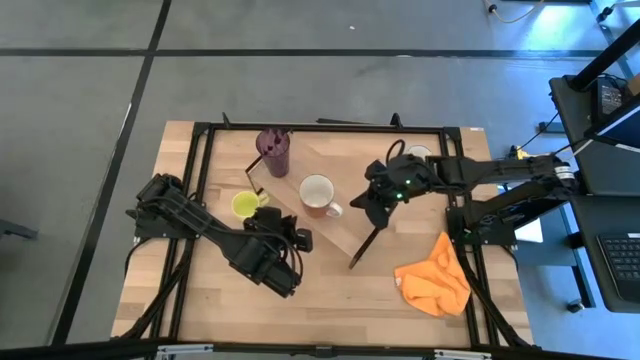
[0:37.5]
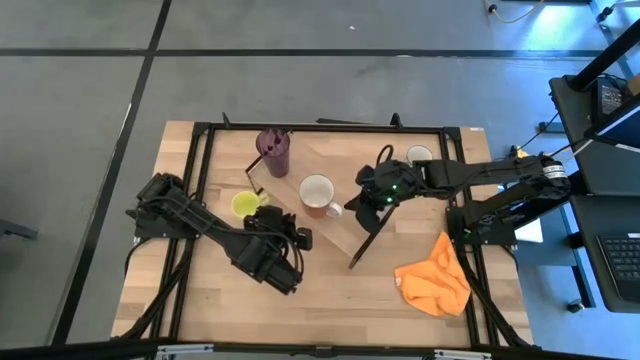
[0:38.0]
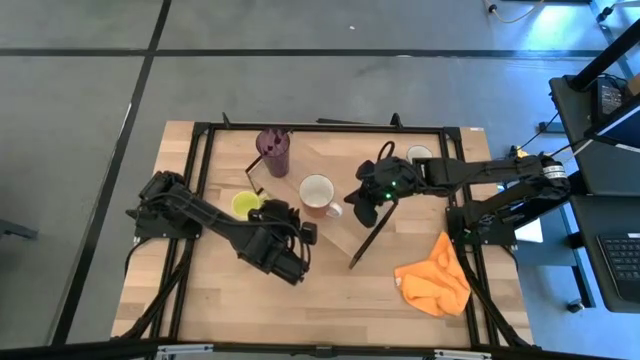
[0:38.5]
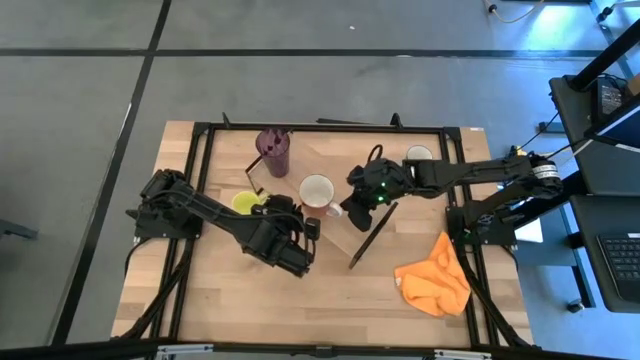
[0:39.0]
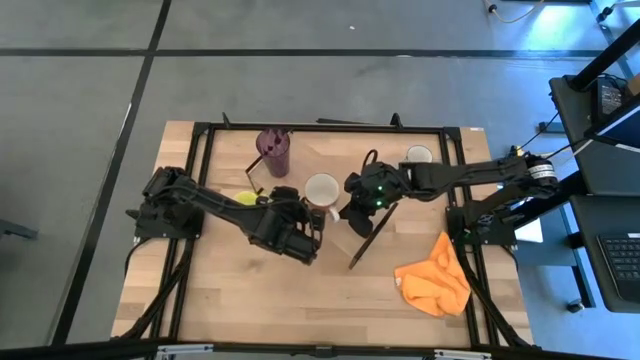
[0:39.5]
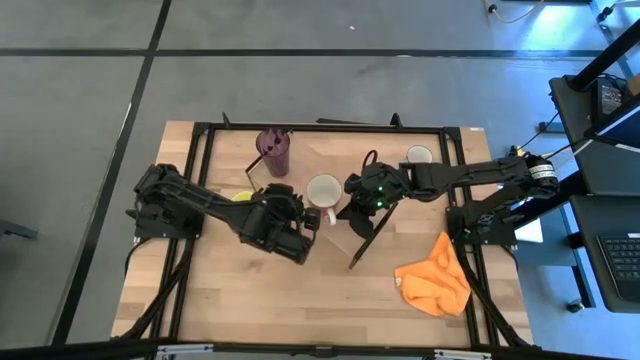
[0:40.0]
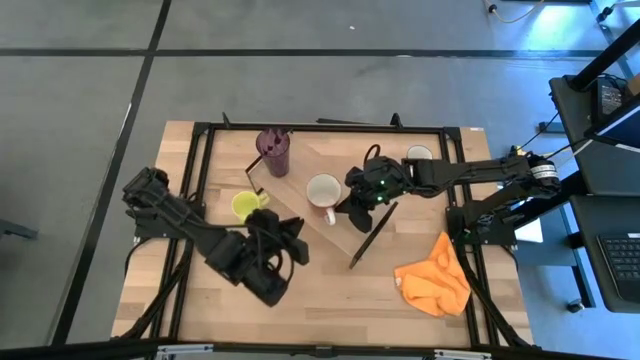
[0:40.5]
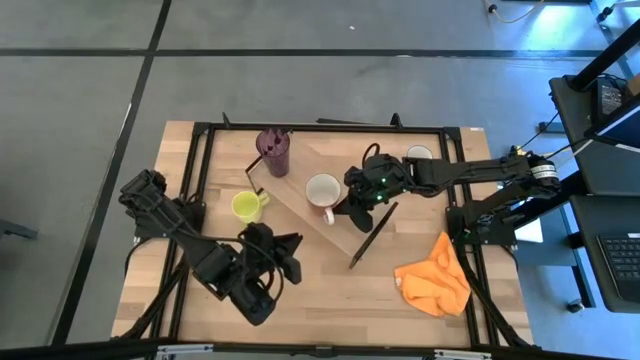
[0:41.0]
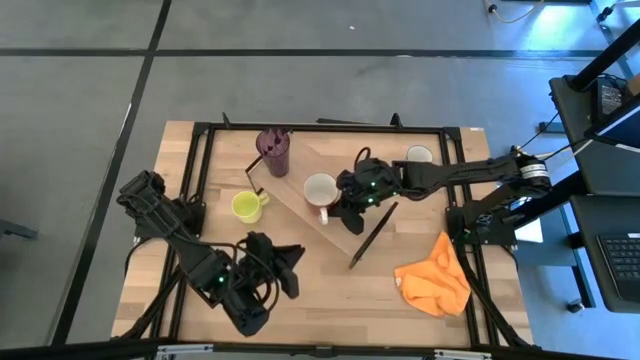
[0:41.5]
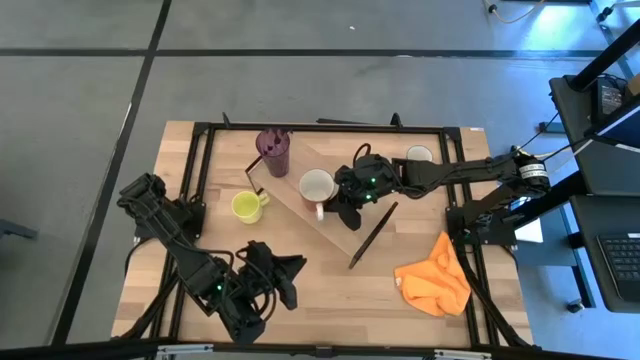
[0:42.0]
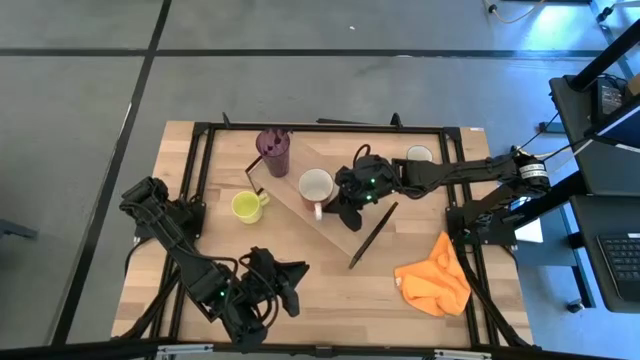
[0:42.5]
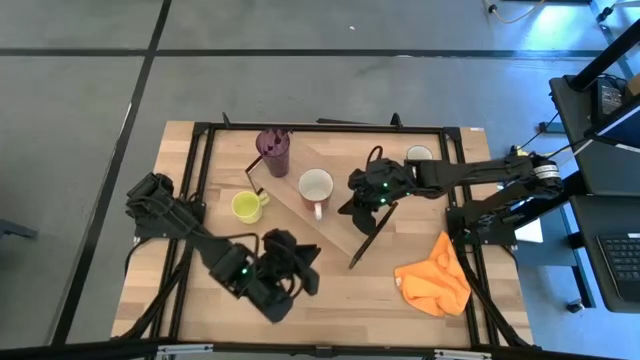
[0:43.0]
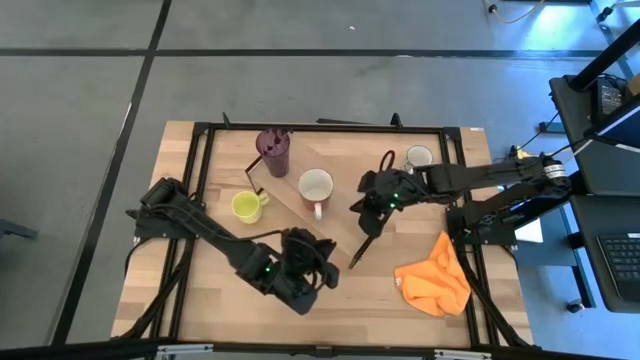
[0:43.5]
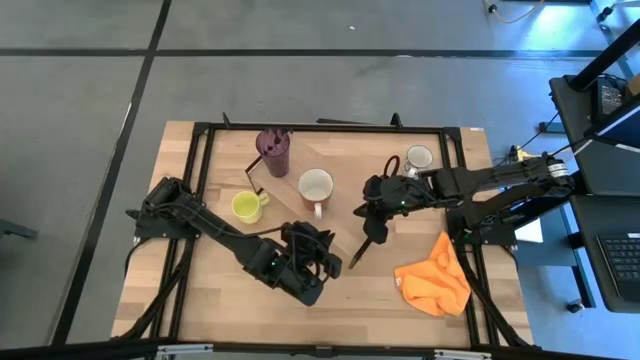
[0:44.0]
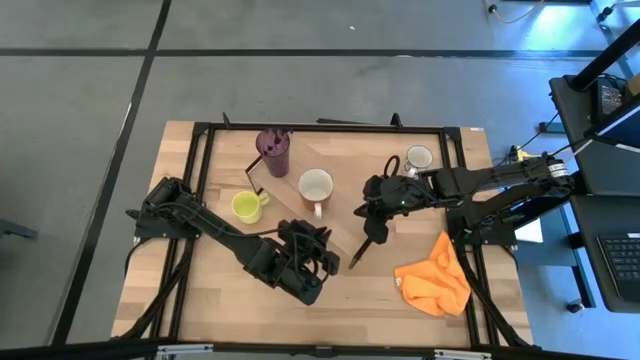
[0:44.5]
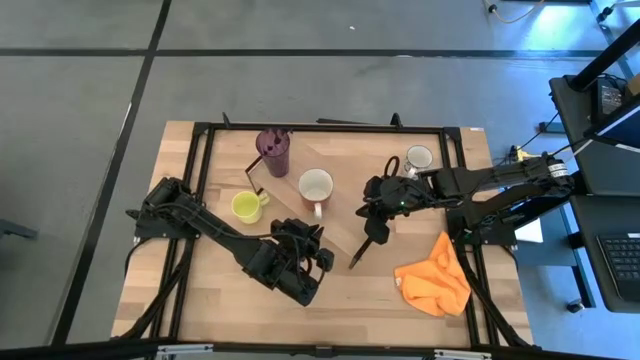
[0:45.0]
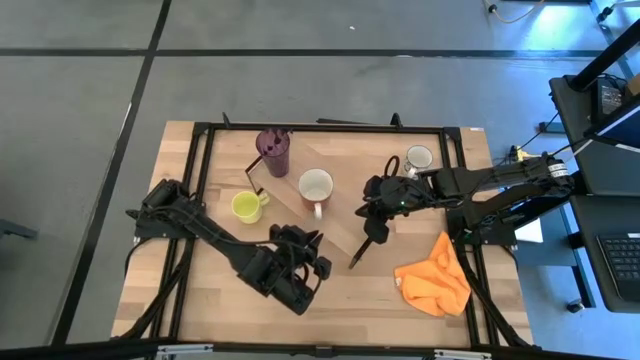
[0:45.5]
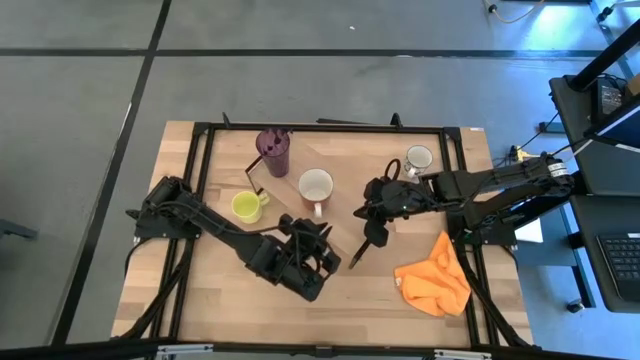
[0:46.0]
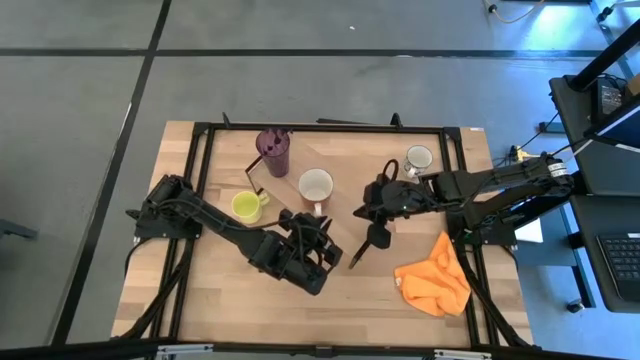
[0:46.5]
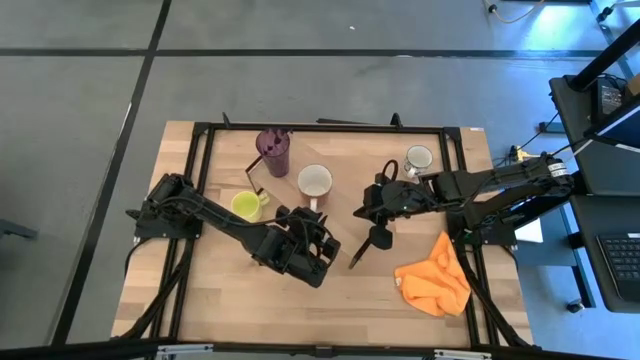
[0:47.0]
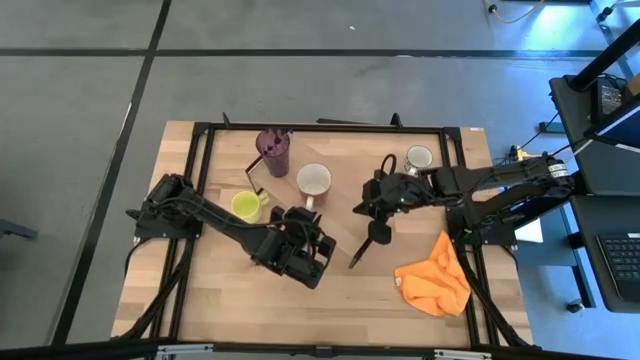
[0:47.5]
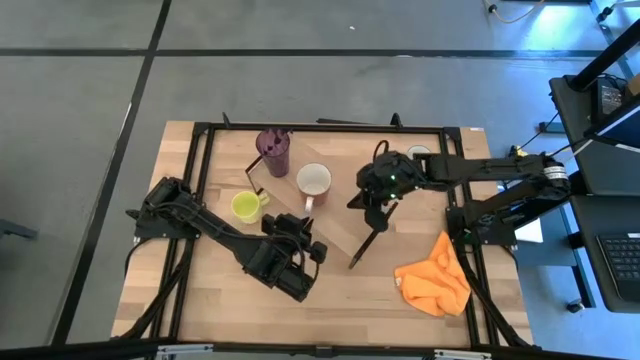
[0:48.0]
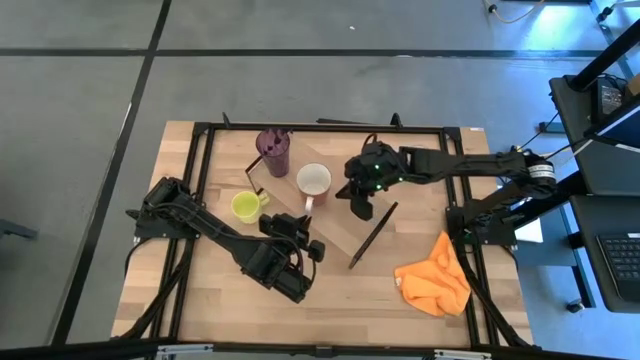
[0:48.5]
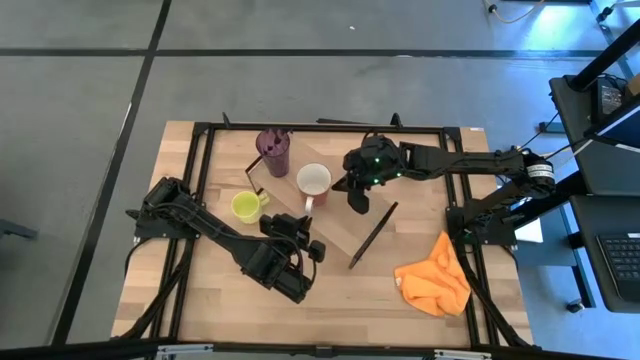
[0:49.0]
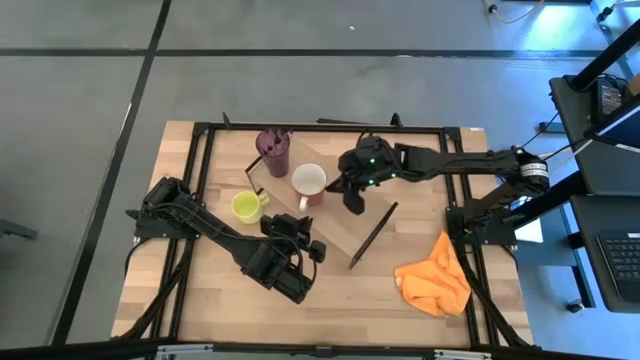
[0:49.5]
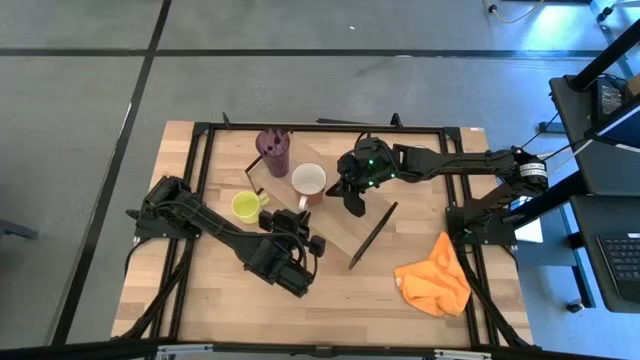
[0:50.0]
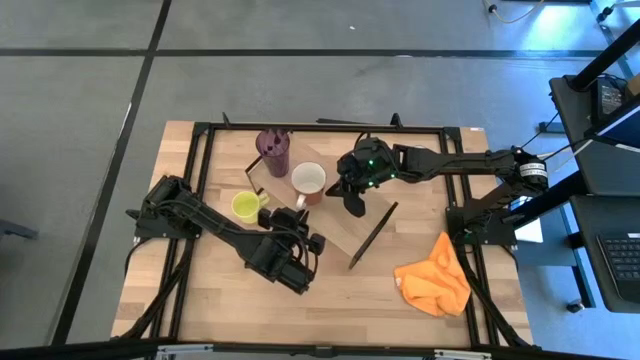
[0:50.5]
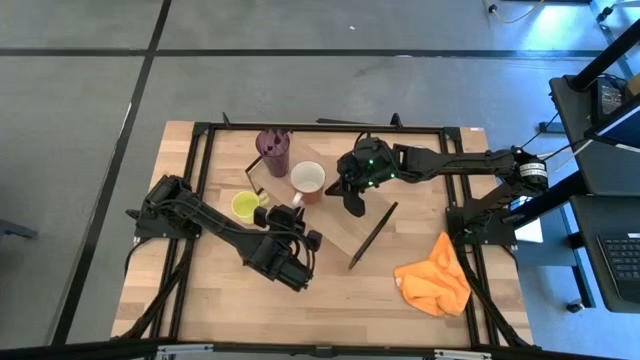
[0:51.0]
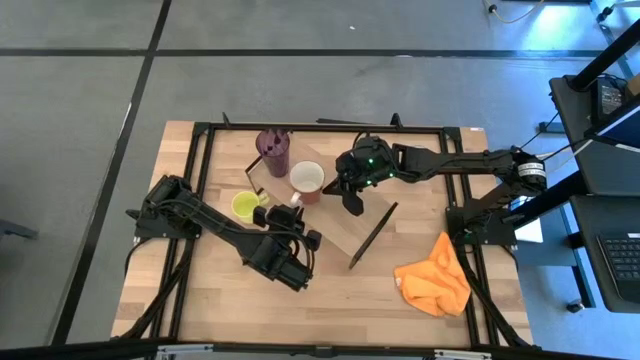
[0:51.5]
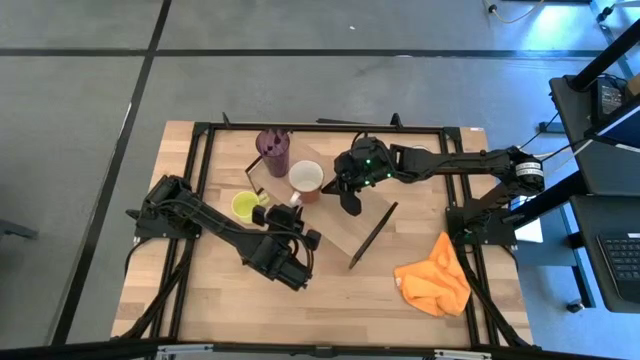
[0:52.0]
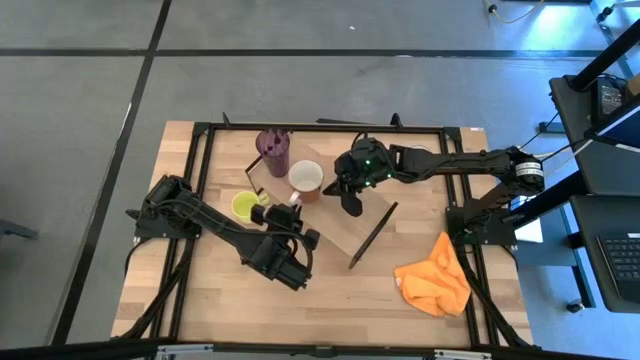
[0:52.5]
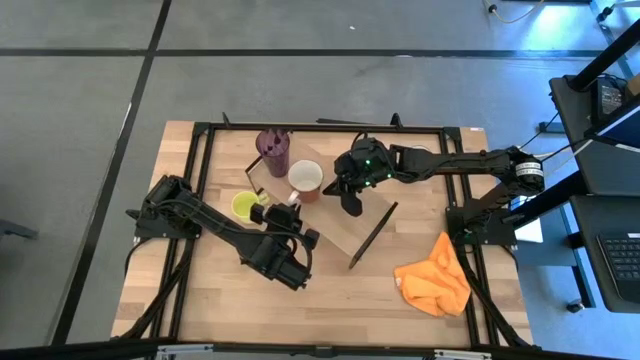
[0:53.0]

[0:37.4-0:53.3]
Task: Stack small to large cups/mugs on shelf
Put the orange mug on the shelf

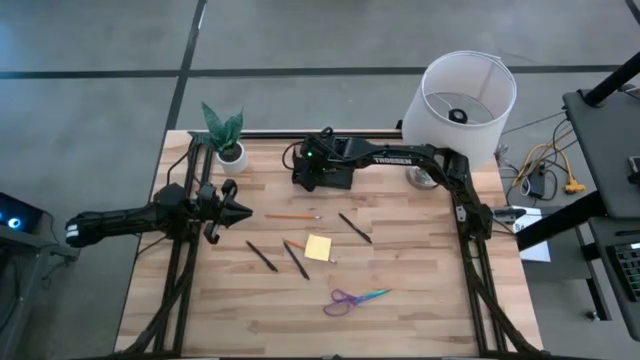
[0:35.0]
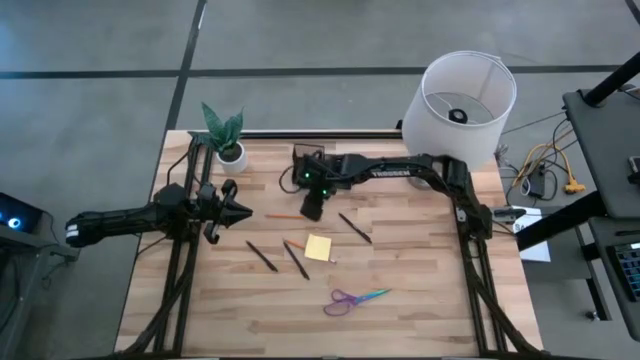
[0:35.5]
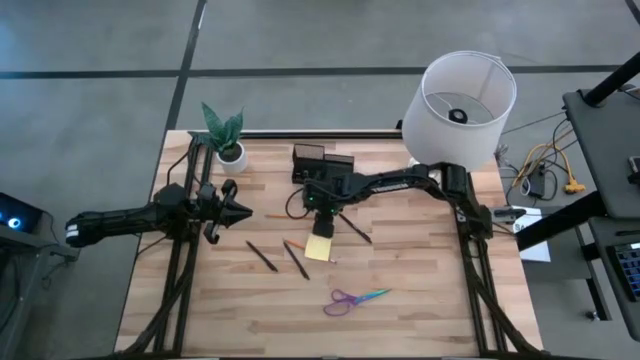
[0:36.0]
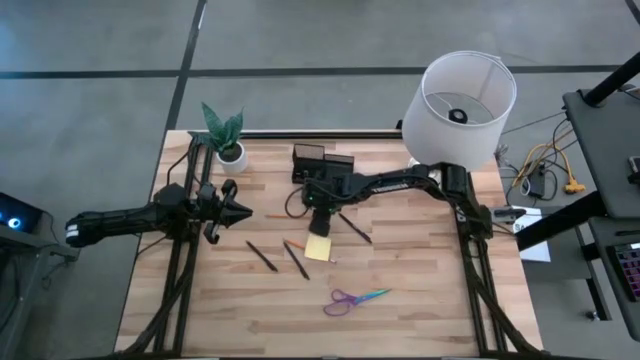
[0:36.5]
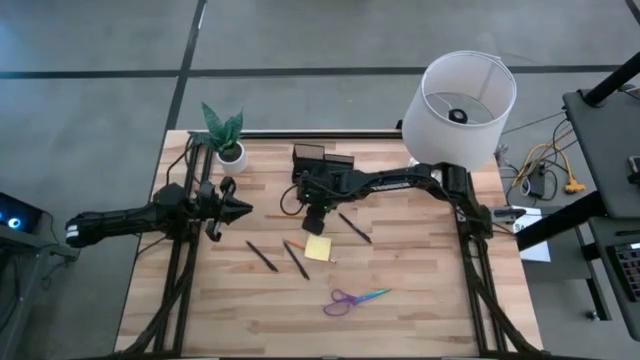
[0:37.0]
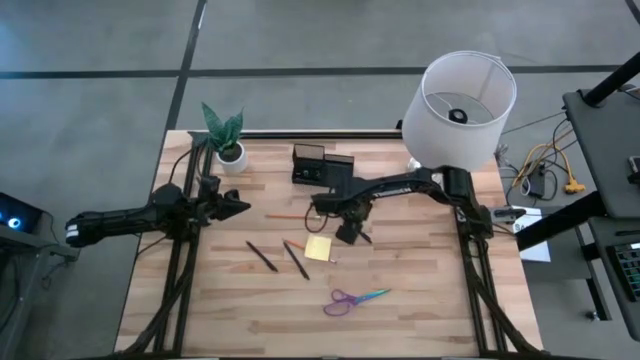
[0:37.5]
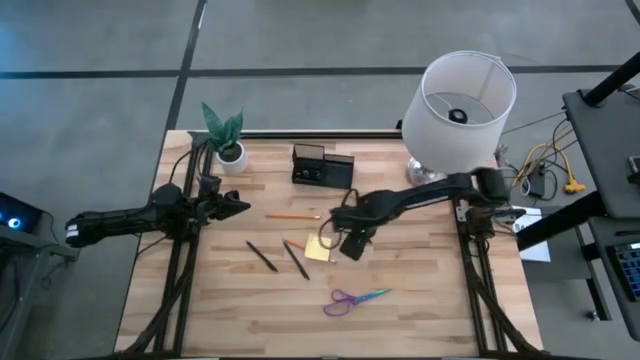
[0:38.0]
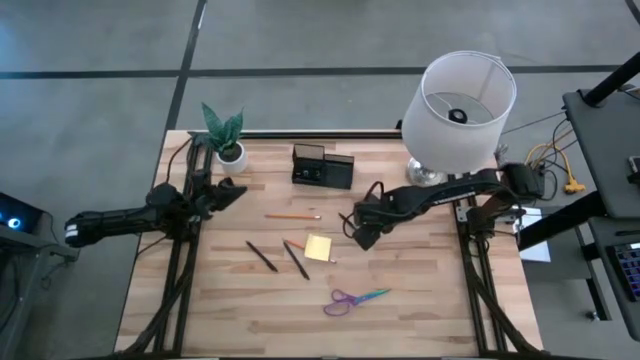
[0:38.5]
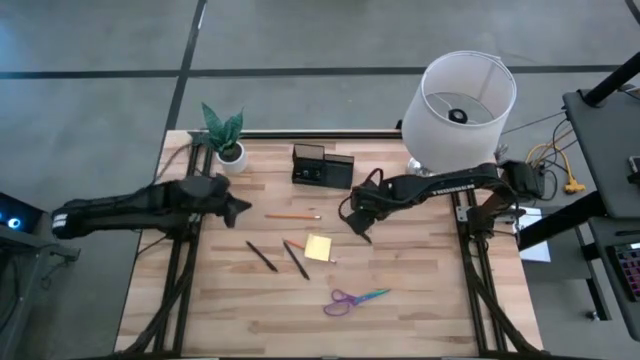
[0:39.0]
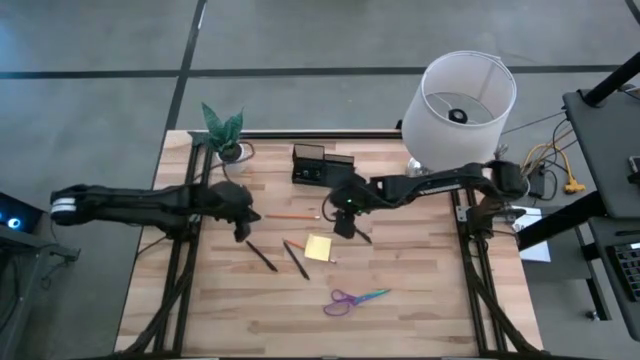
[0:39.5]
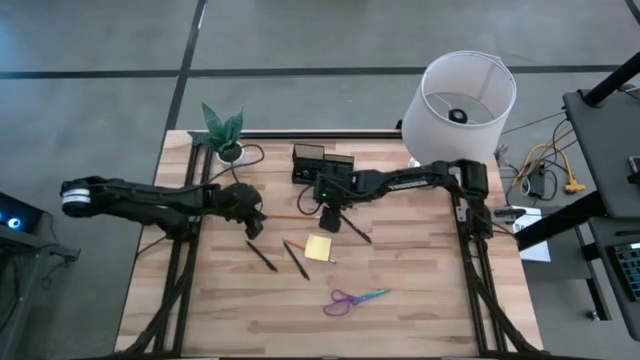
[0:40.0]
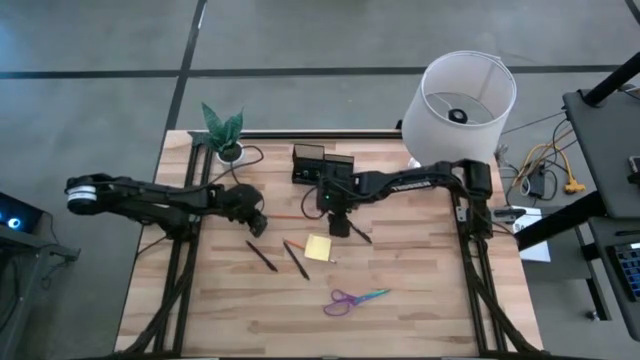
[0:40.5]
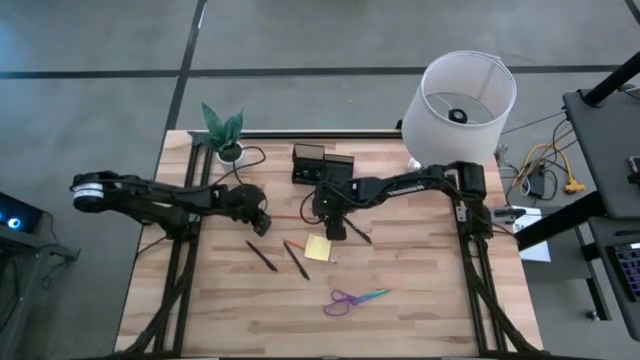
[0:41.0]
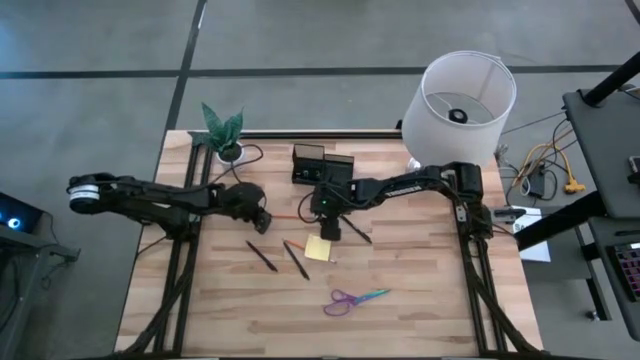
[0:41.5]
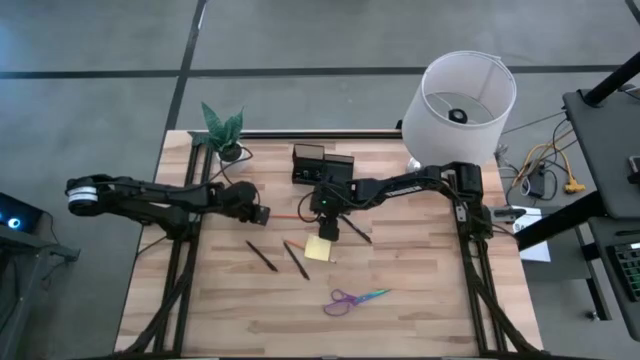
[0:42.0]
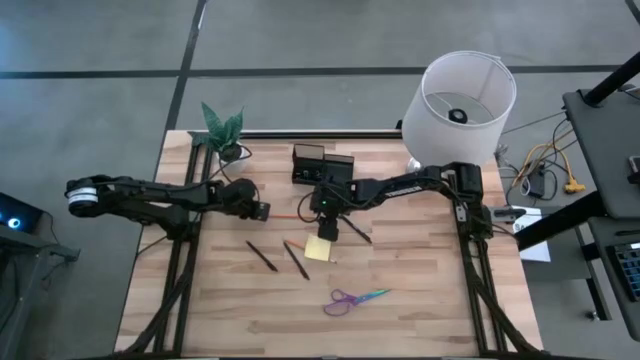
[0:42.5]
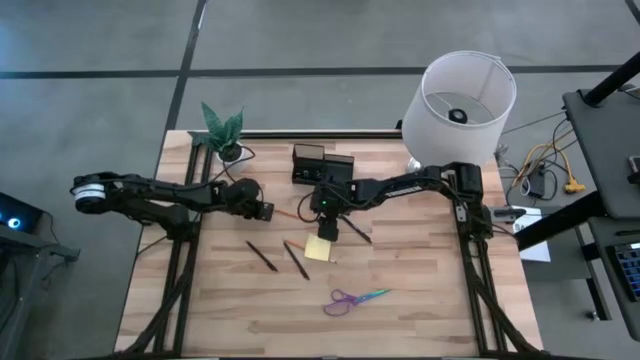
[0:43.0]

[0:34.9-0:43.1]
Task: Pick and place office supplies into organizer
Put the top yellow pencil into the black desk organizer
